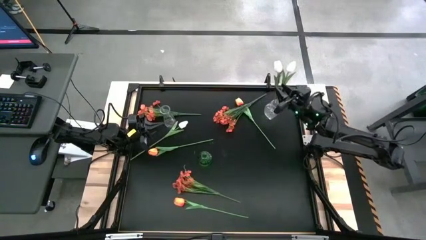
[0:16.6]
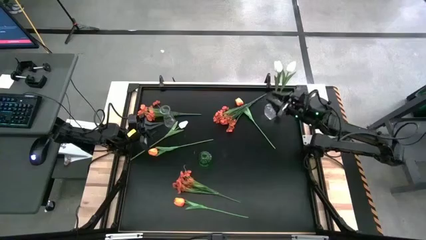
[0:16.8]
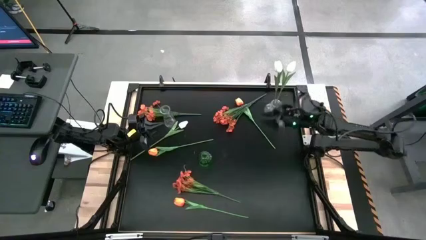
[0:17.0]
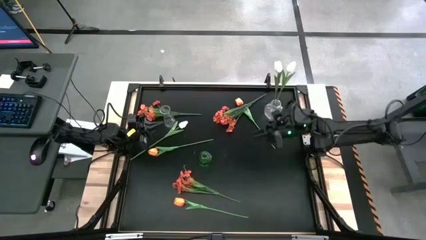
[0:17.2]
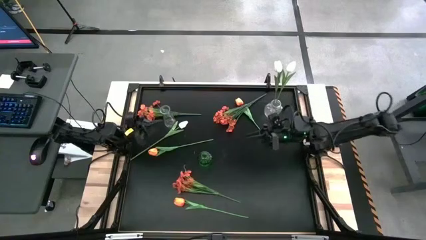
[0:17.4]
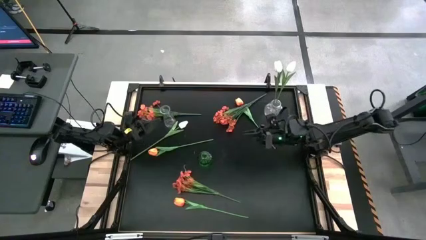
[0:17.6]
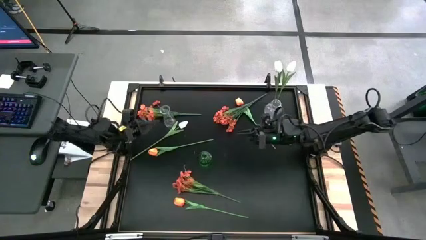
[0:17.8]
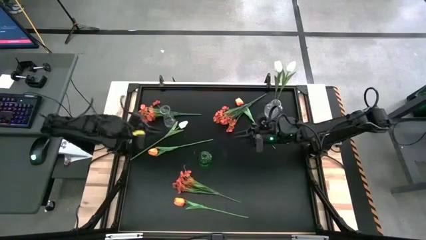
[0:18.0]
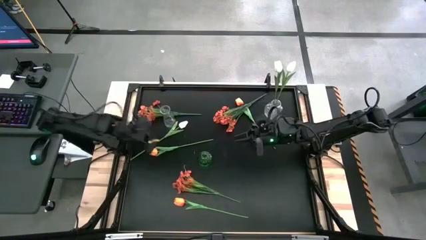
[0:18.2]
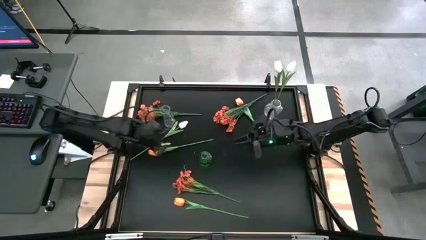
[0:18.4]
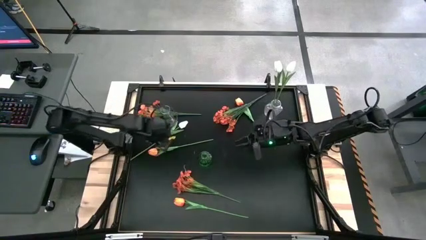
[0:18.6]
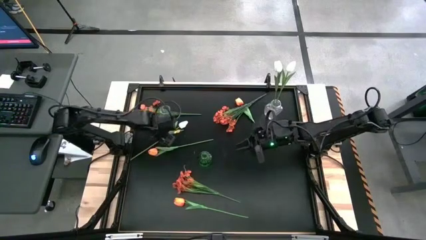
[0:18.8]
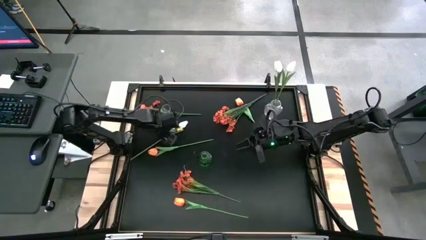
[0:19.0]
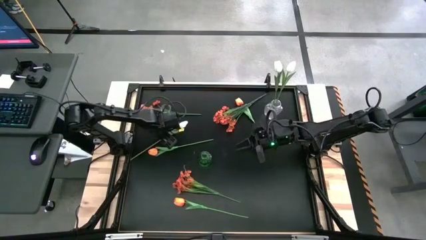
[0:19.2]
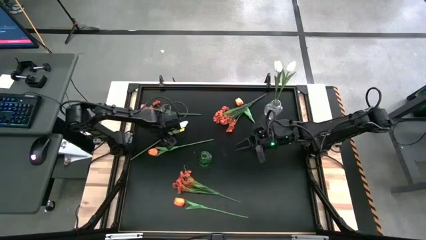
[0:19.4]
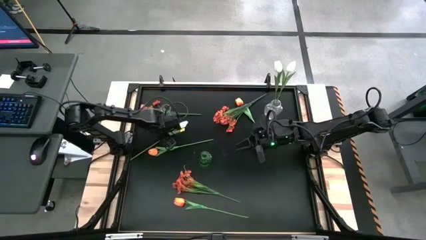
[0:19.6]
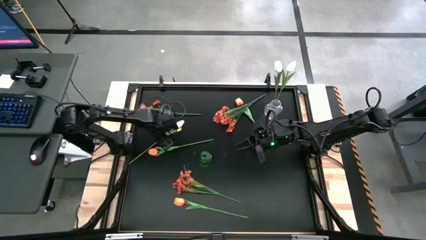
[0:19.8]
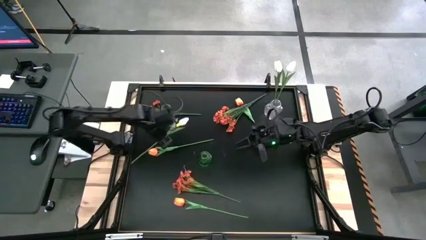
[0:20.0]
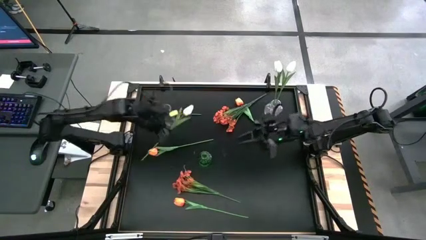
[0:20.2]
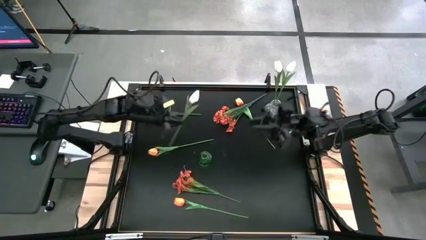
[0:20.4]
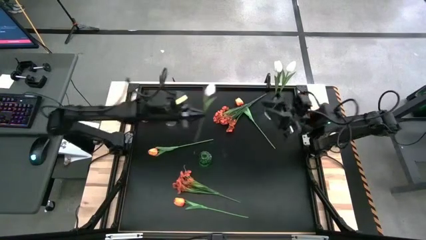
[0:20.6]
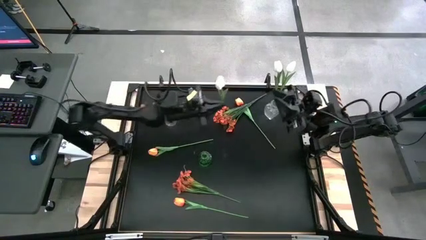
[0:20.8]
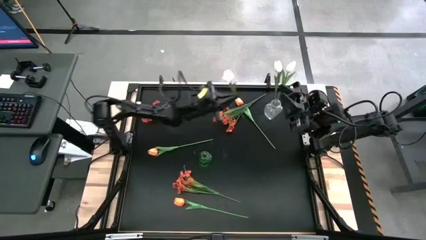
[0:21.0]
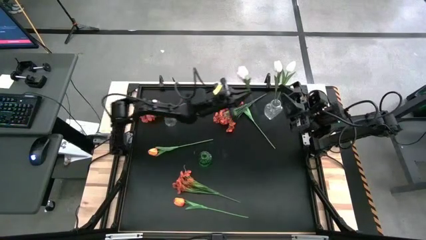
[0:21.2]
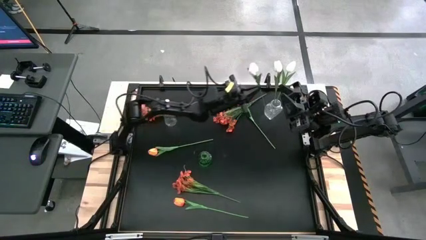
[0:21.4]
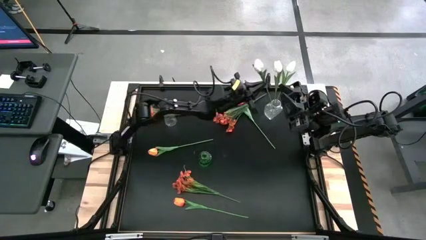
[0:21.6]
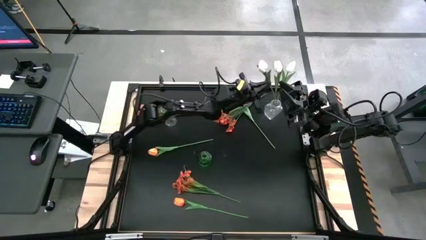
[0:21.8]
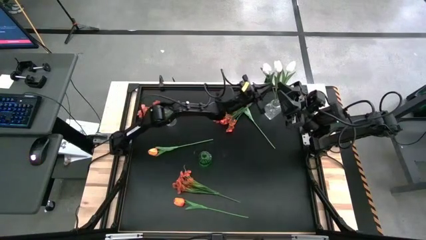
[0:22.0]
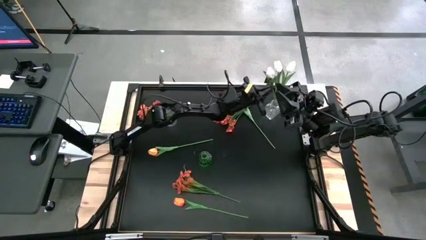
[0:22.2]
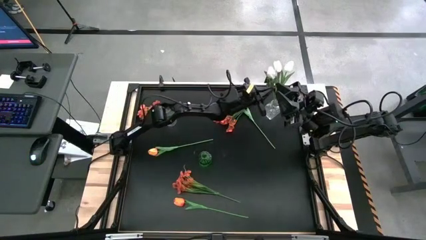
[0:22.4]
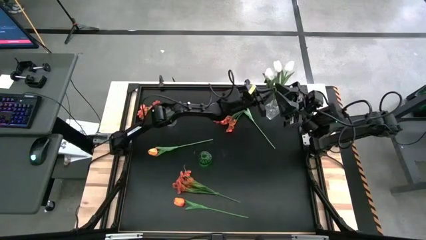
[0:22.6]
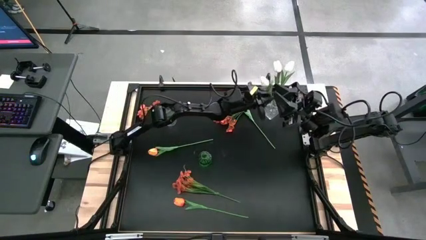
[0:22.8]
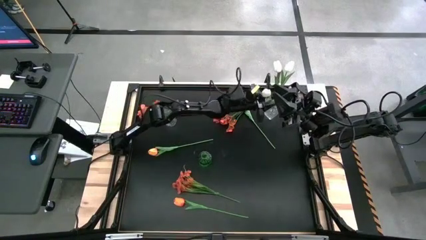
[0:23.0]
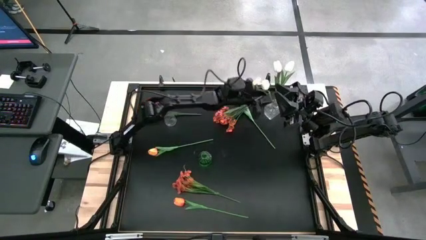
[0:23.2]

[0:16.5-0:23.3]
Task: Sort flowers into vase by color
Put the white flower into the right transparent vase

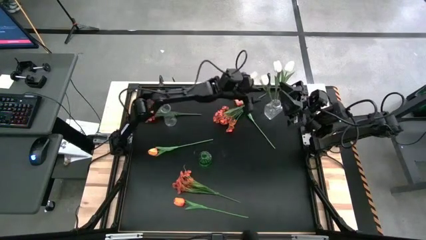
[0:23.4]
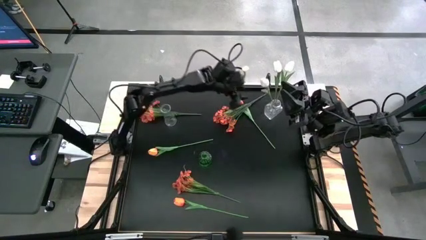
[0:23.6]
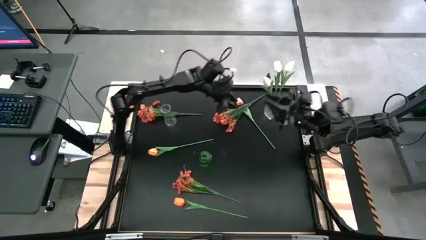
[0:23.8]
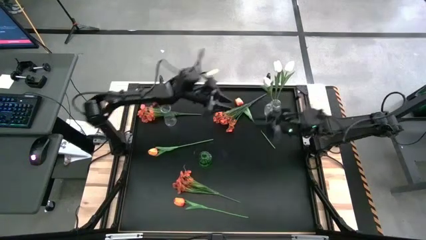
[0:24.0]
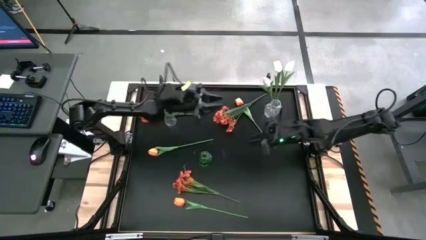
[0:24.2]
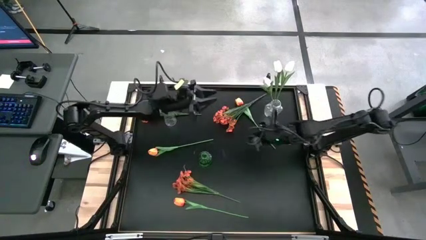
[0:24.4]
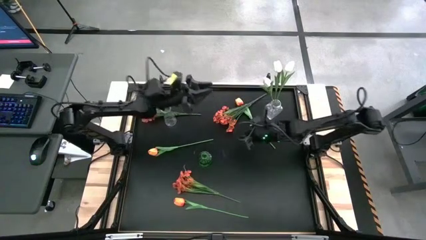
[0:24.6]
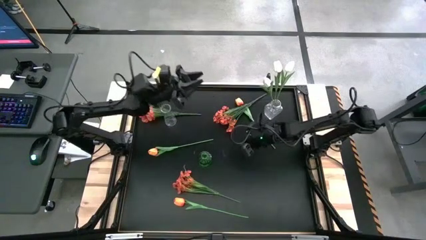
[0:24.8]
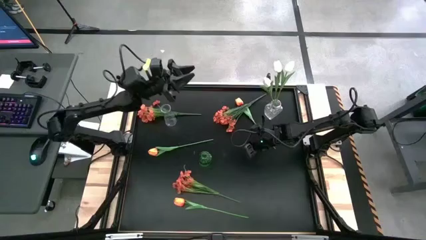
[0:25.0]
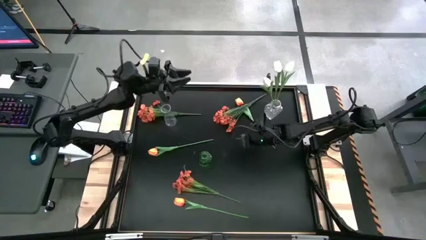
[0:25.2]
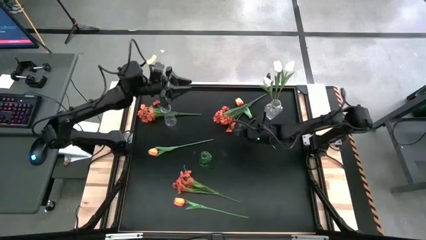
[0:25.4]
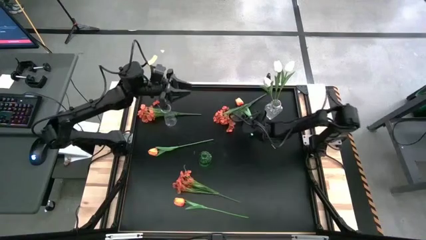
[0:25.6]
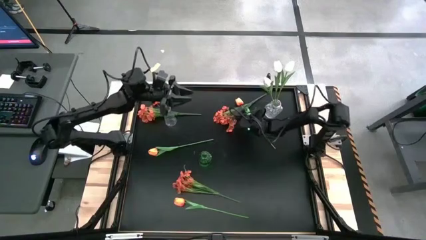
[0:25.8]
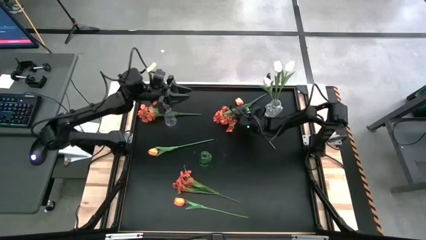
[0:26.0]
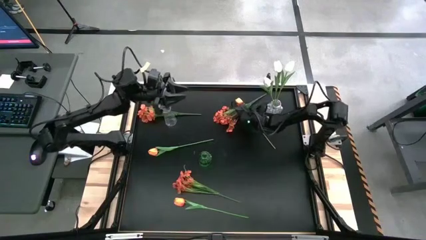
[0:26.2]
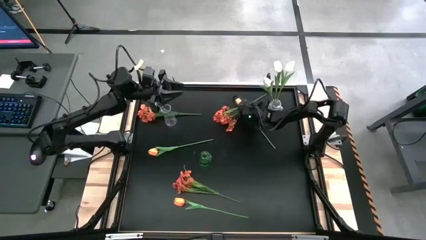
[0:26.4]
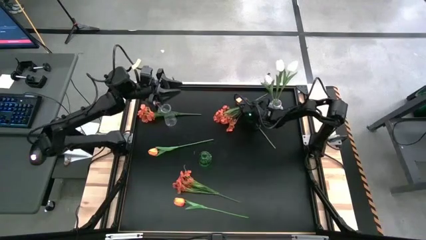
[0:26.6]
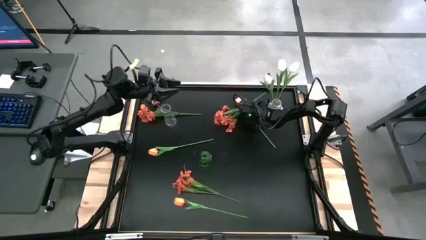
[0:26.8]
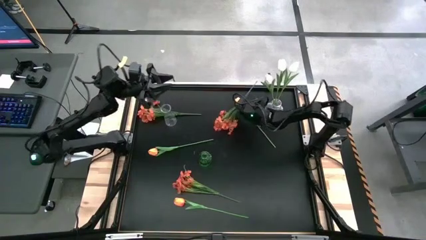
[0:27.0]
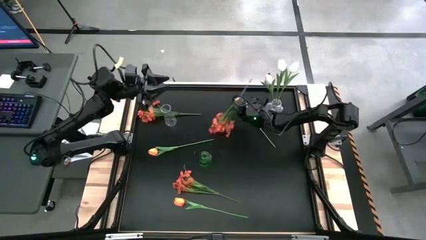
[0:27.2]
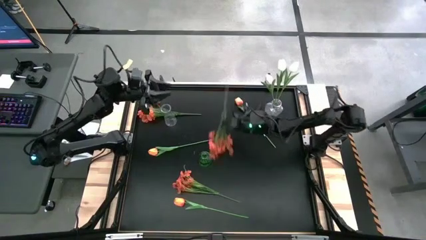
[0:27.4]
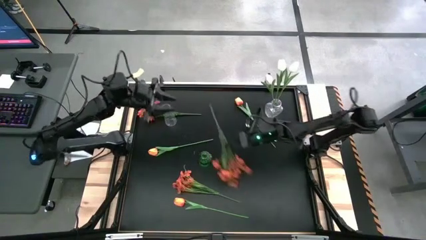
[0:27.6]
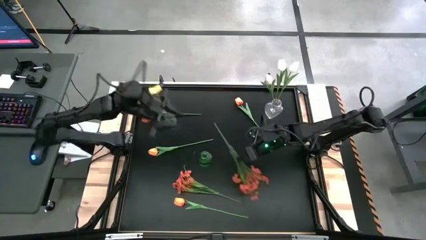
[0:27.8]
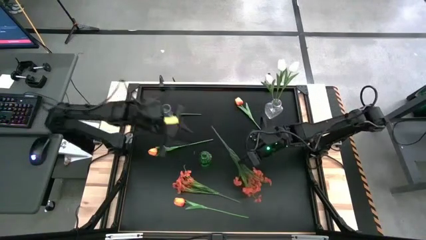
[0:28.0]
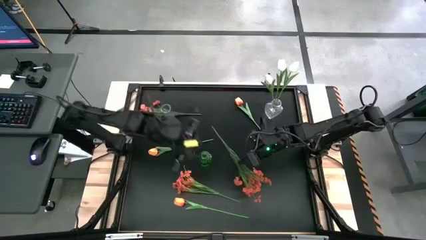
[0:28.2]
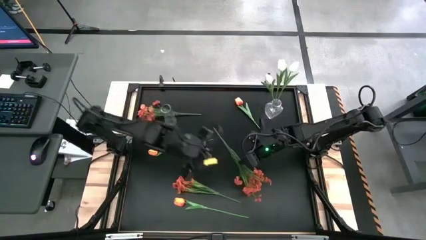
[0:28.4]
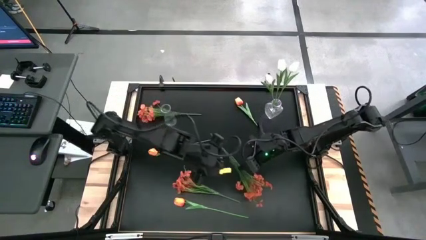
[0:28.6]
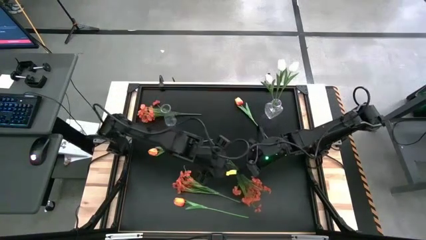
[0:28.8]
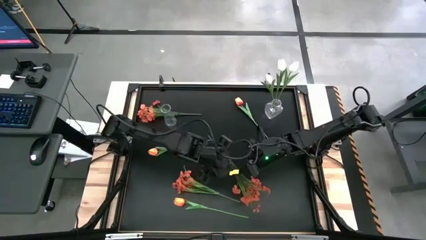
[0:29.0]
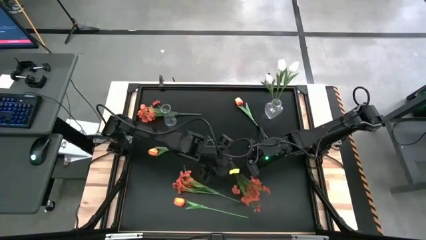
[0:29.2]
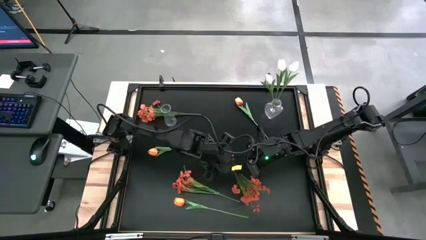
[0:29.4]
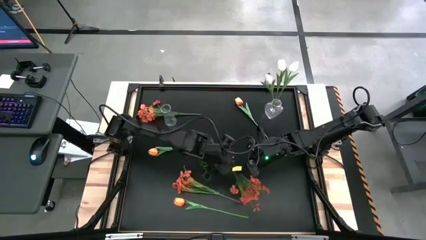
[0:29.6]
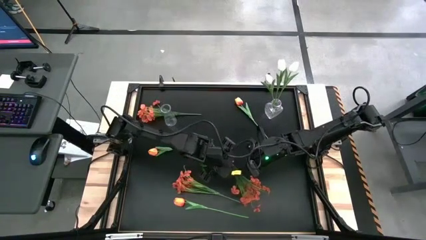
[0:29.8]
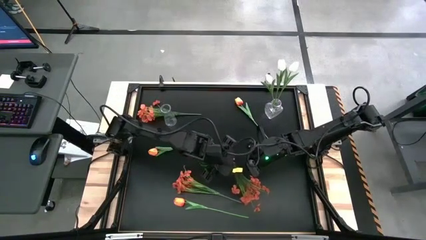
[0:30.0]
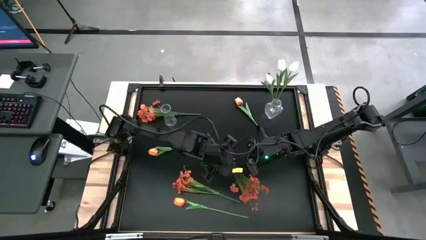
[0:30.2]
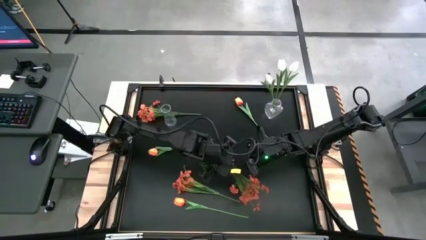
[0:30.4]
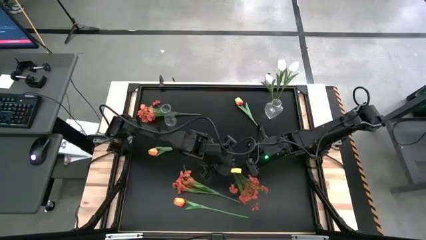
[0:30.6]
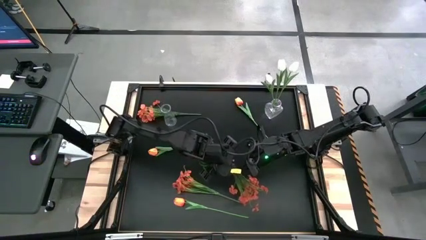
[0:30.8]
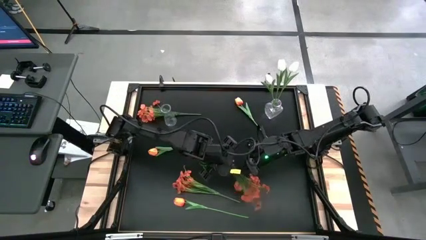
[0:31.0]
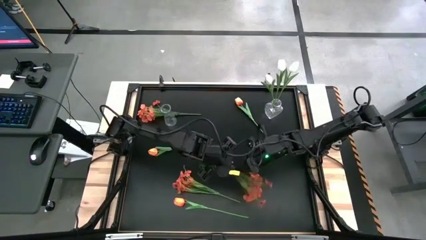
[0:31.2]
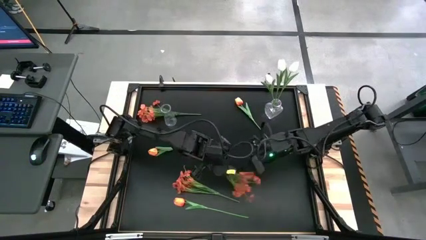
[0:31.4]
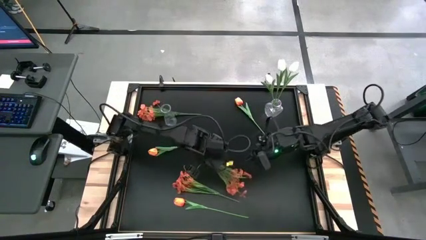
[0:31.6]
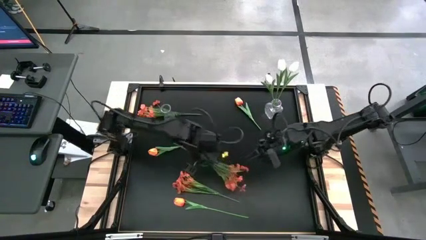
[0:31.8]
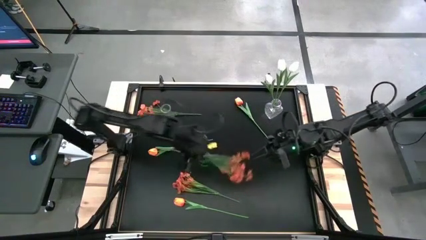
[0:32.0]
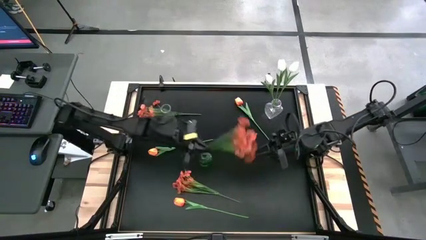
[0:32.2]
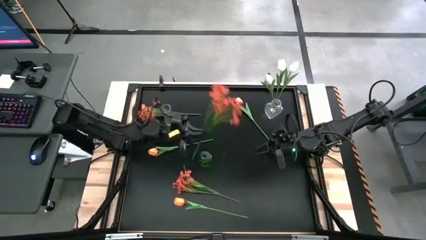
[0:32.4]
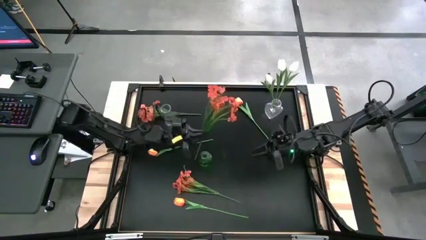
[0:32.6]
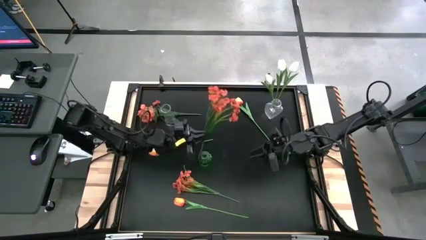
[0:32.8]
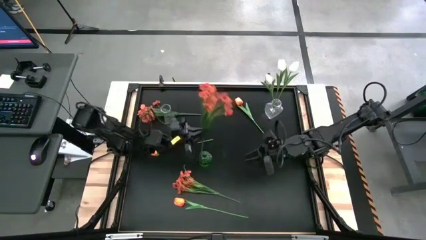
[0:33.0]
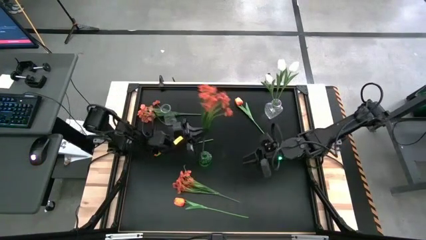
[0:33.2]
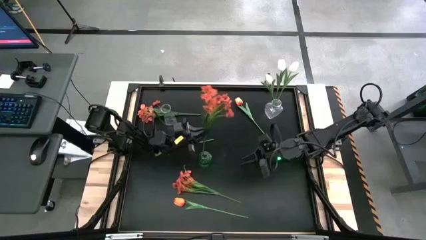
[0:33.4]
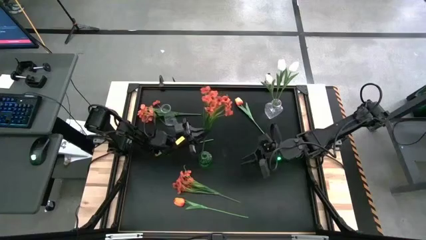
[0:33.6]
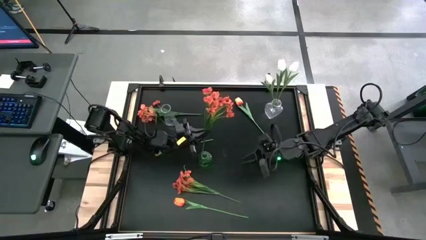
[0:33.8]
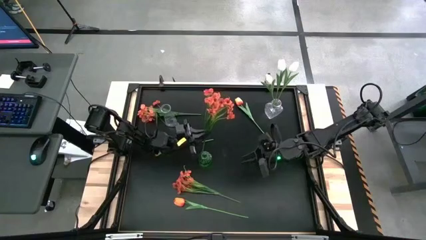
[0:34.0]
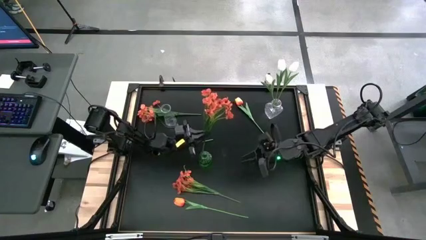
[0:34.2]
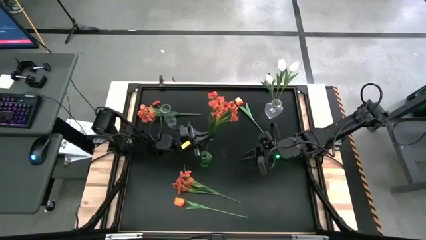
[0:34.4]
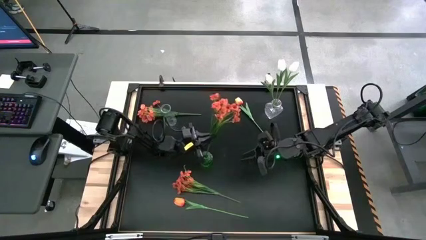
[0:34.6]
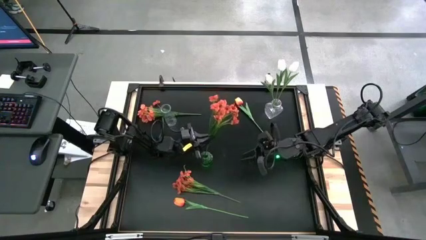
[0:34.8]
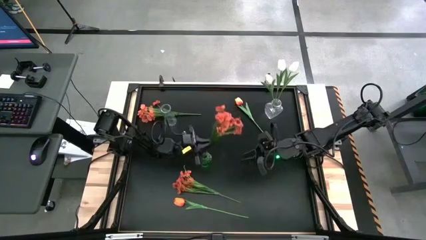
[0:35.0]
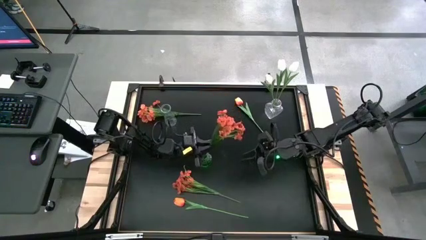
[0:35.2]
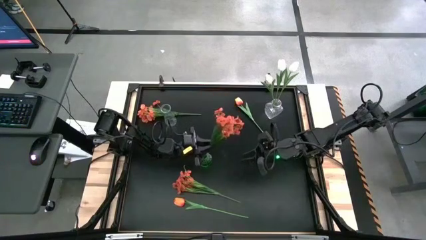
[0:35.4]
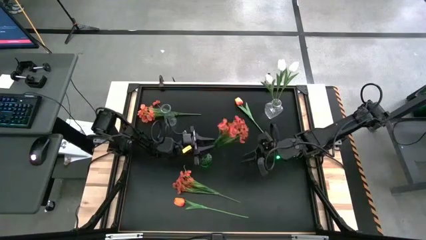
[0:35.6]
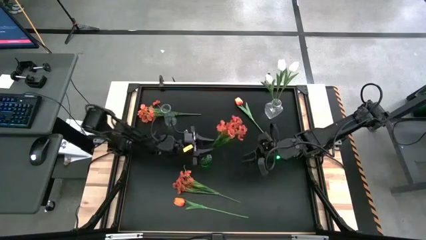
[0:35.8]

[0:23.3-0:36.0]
Put the top right orange flowers into the green vase
